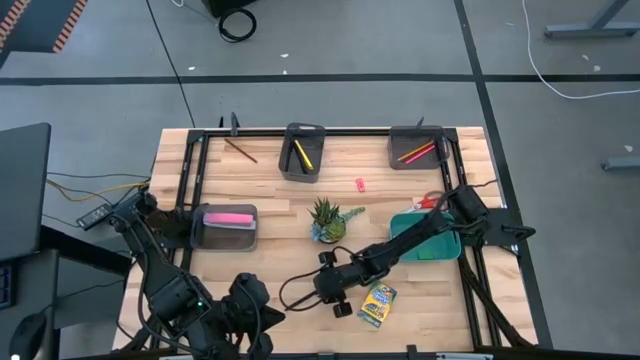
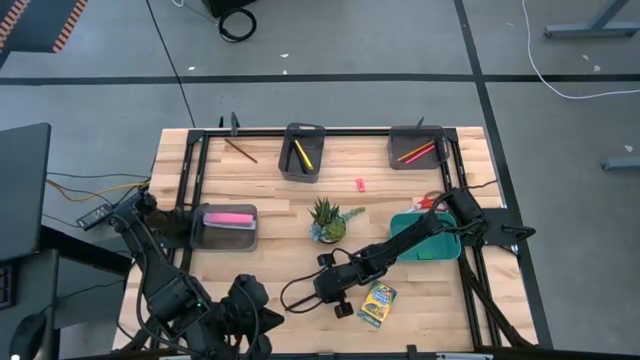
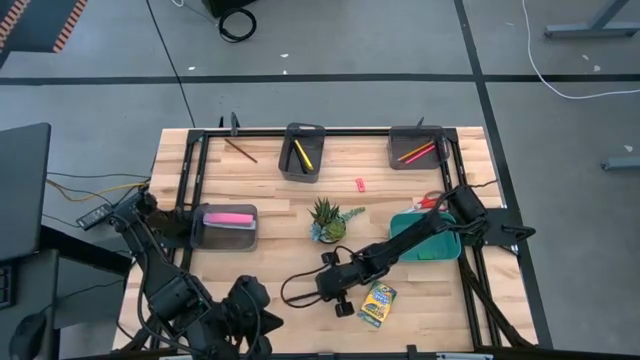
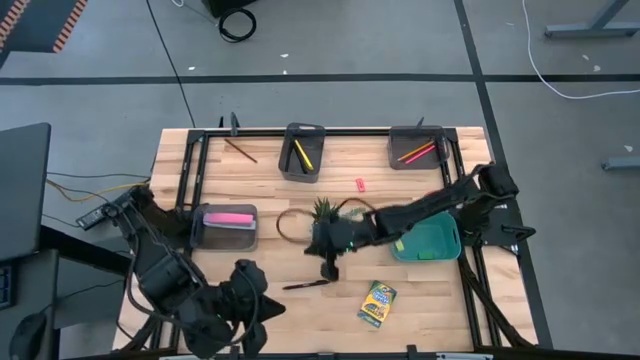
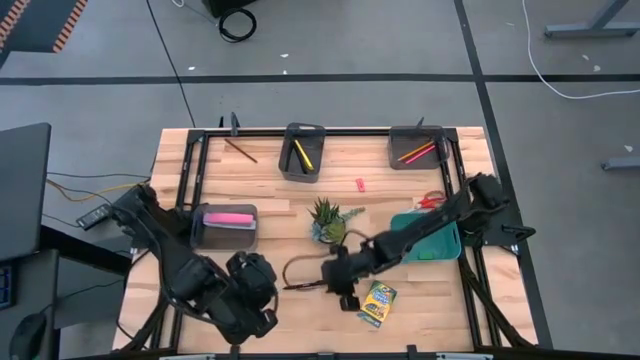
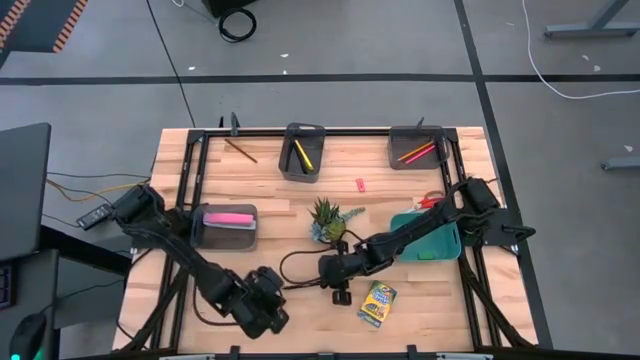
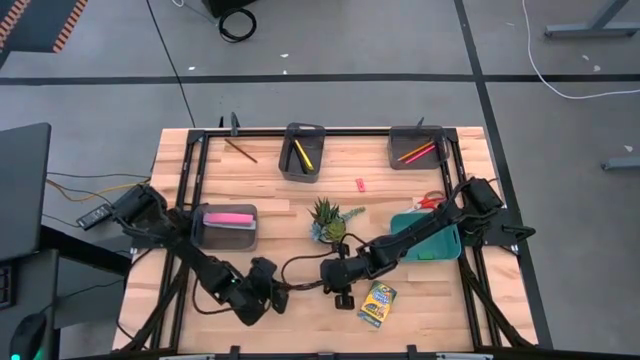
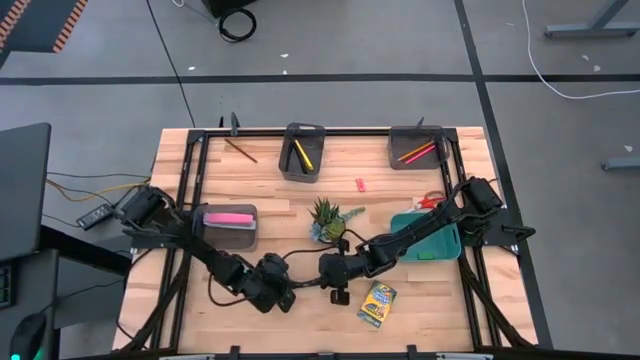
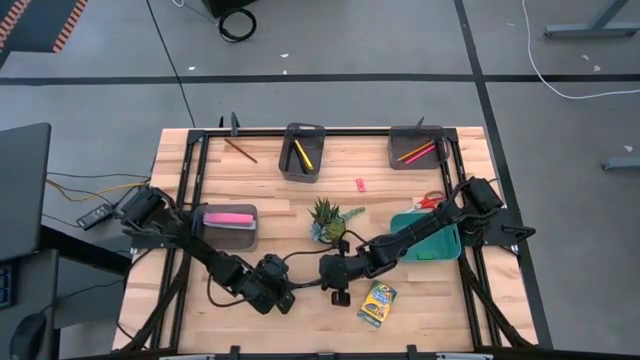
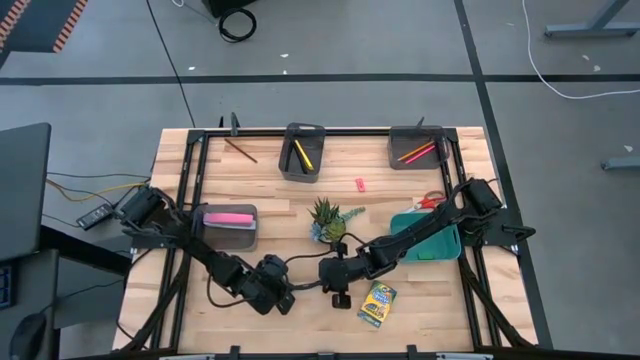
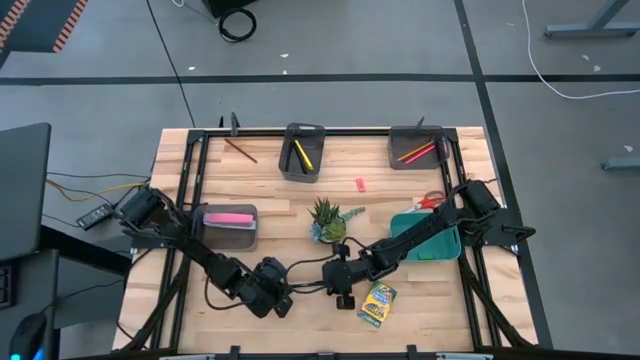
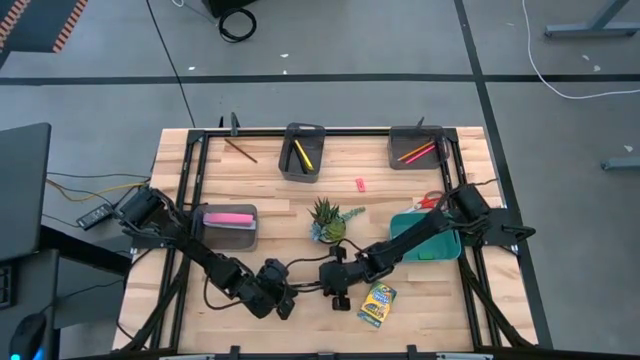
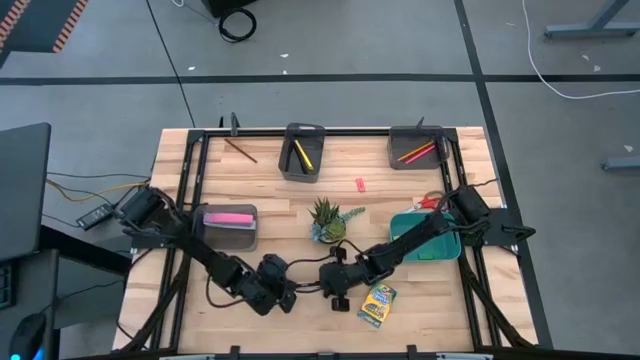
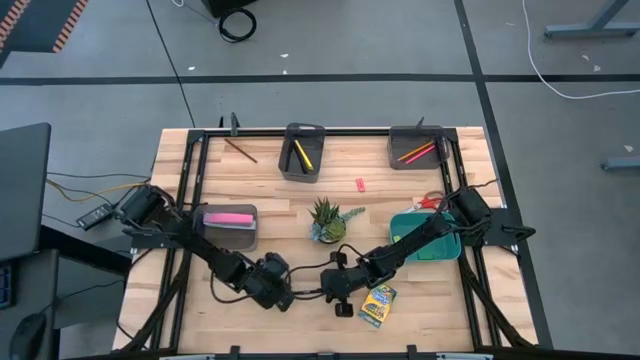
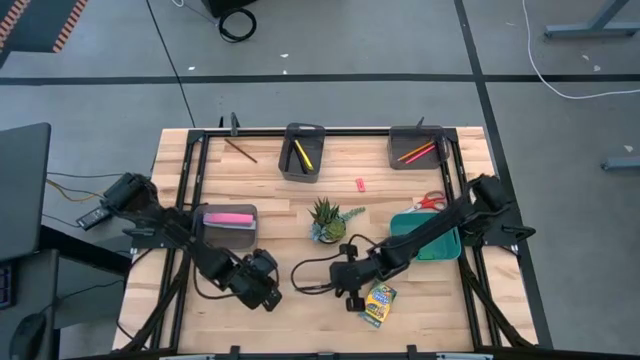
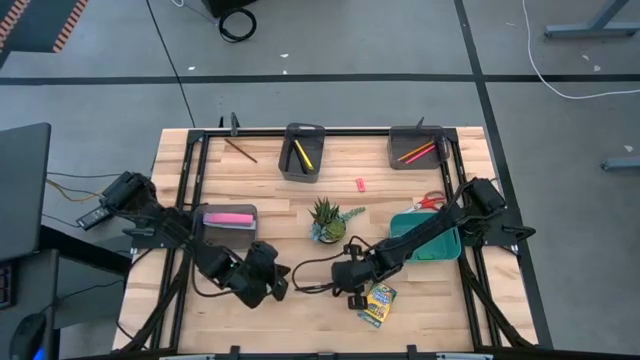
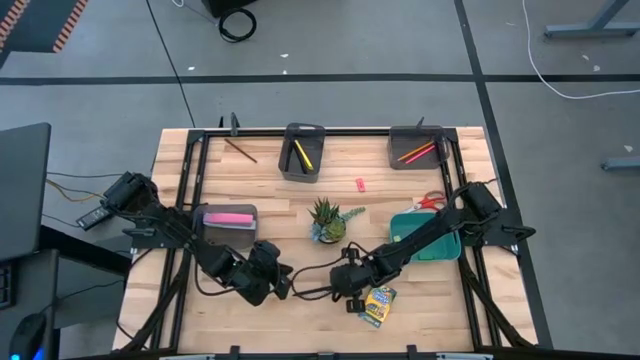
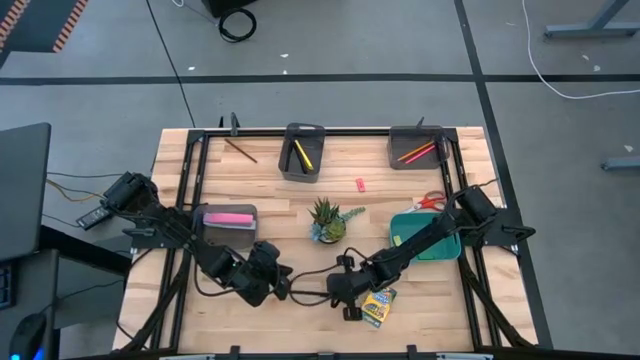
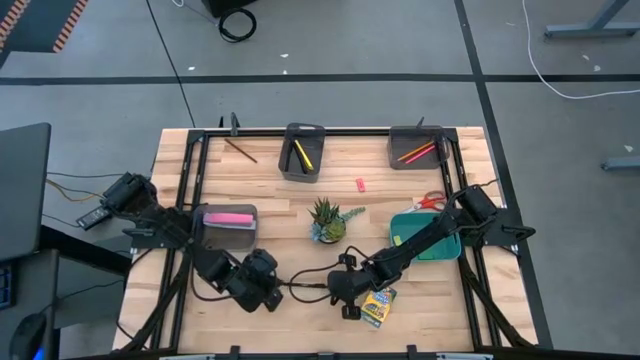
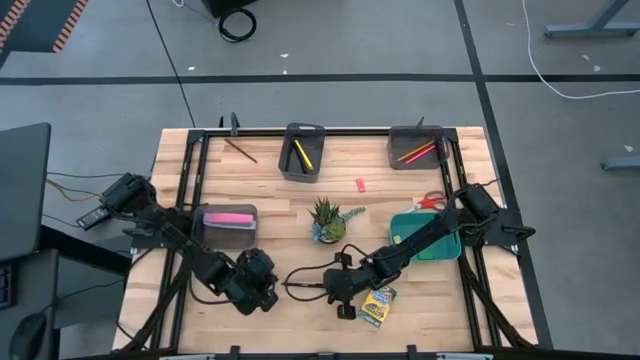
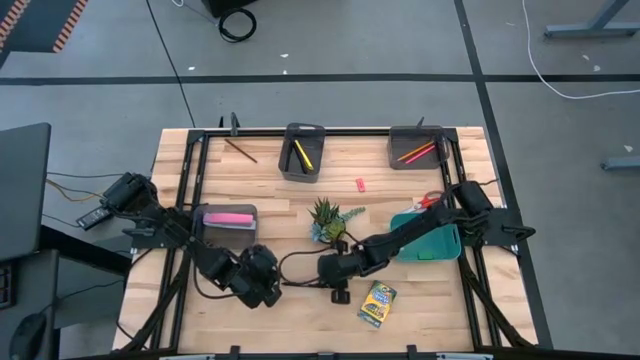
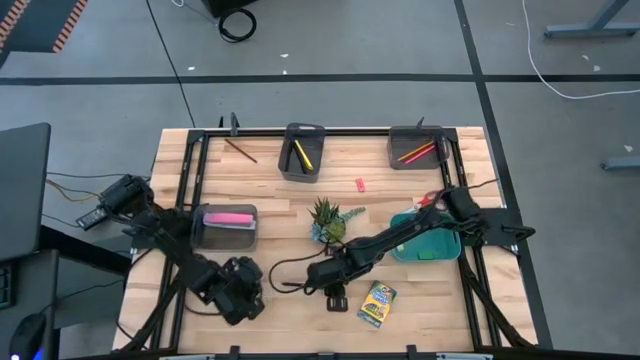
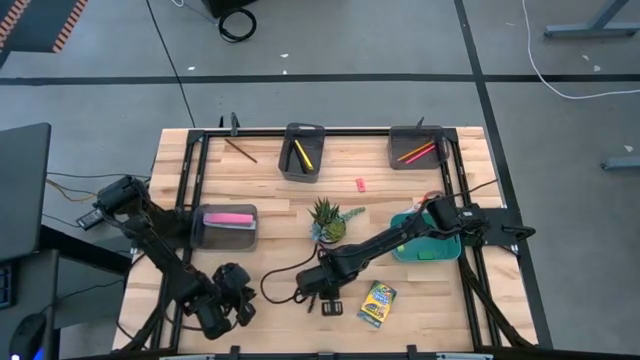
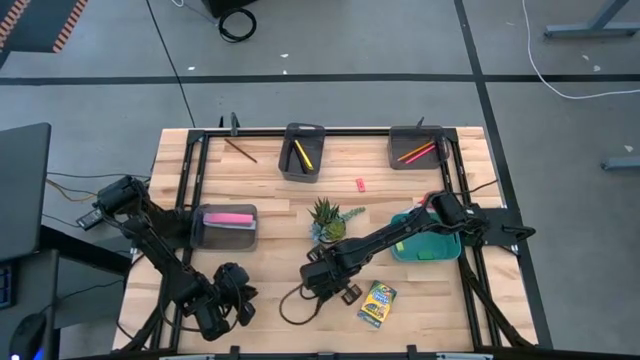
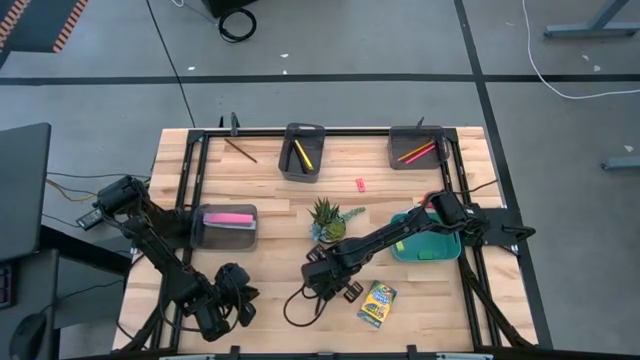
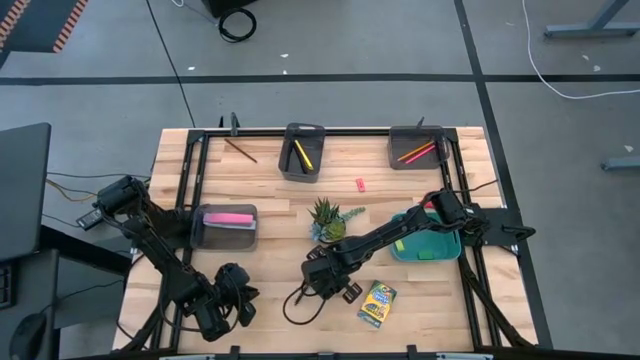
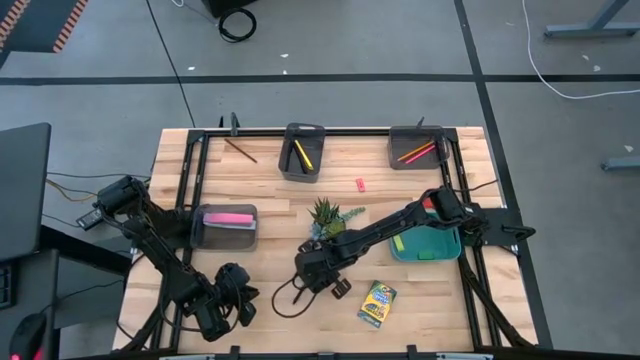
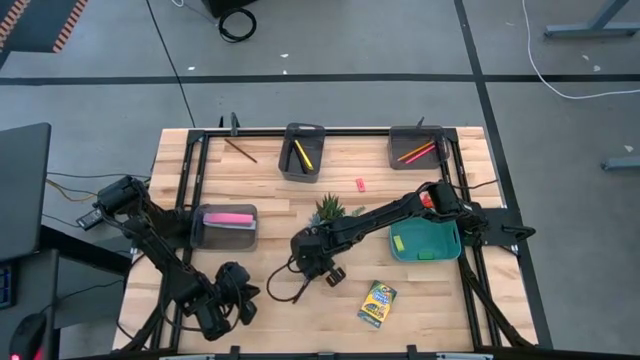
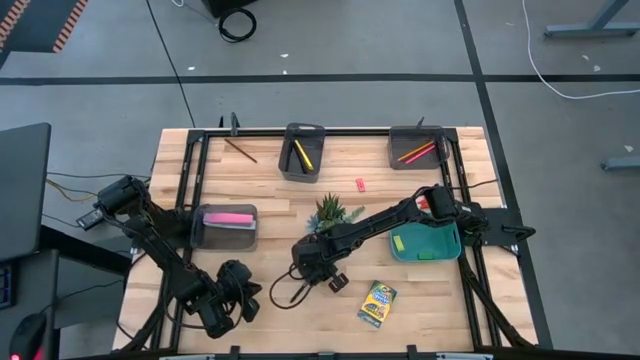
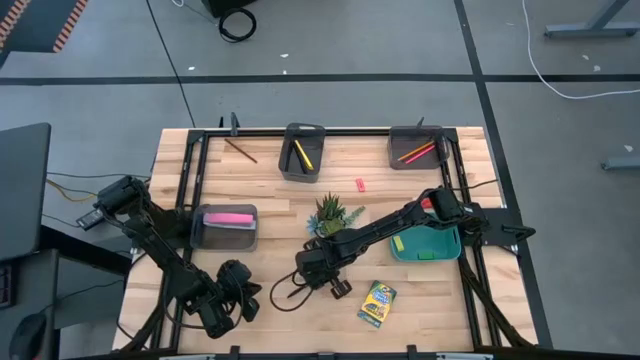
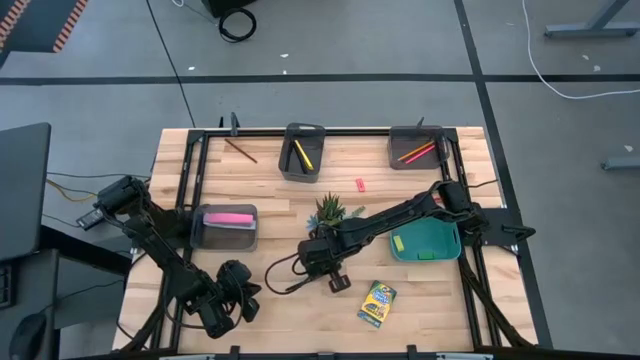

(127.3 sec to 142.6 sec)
Task: Sort crayons/erasers/pens/pencils in bins
Put the black pen into the left black bin

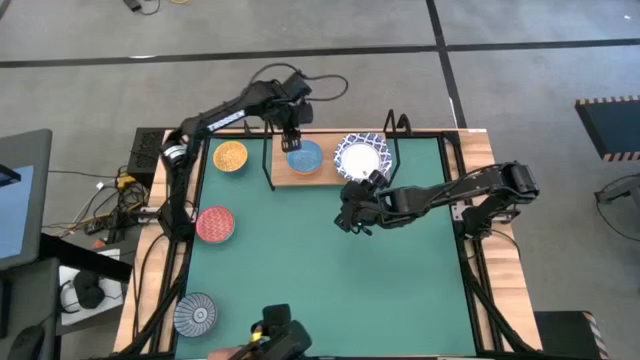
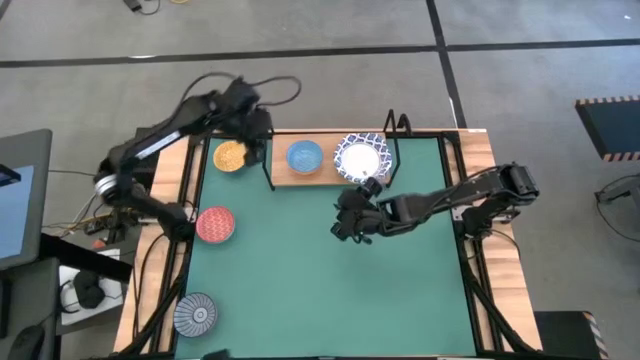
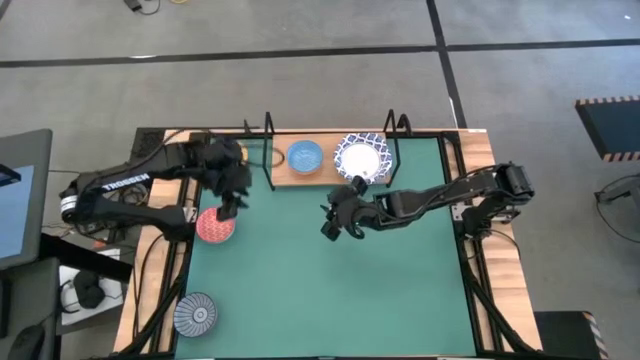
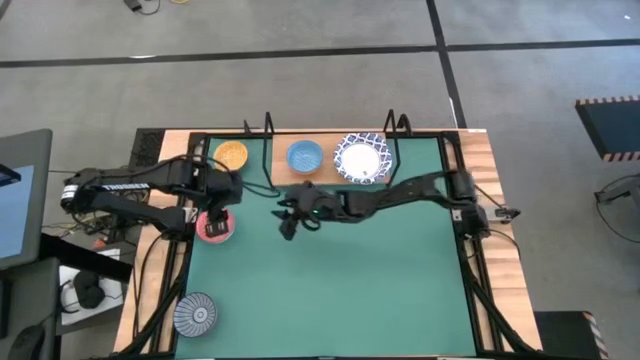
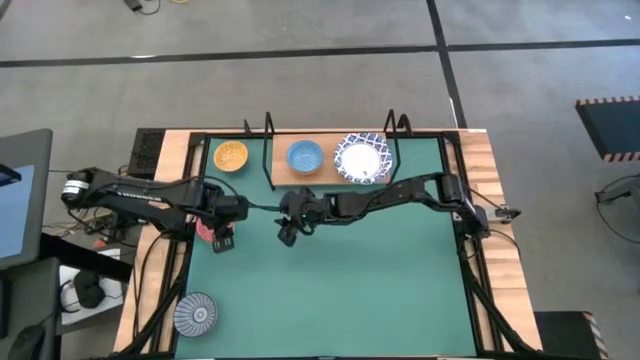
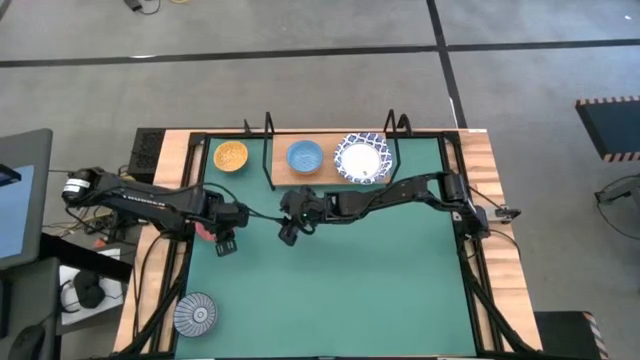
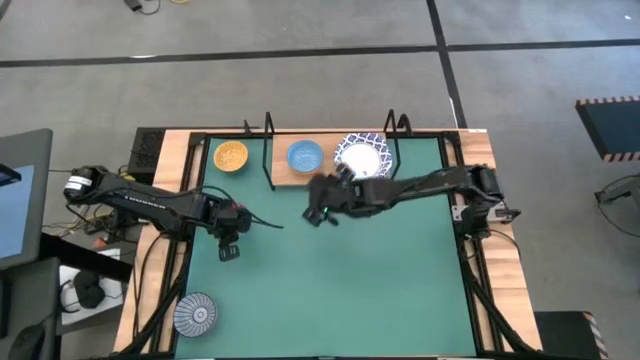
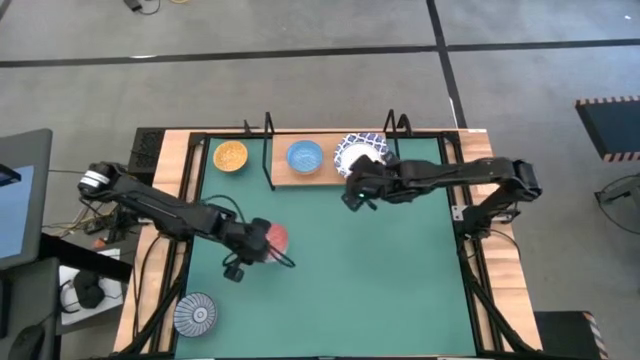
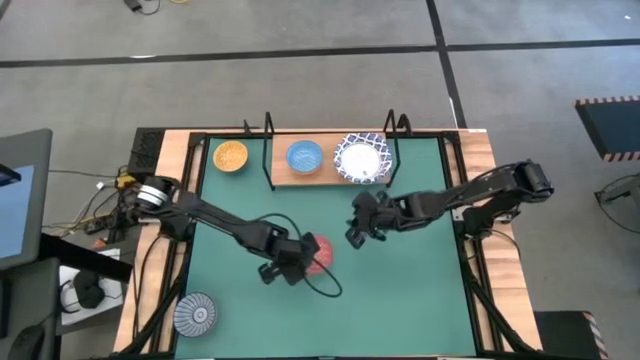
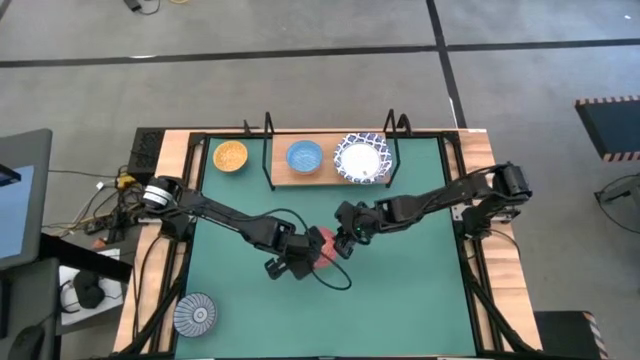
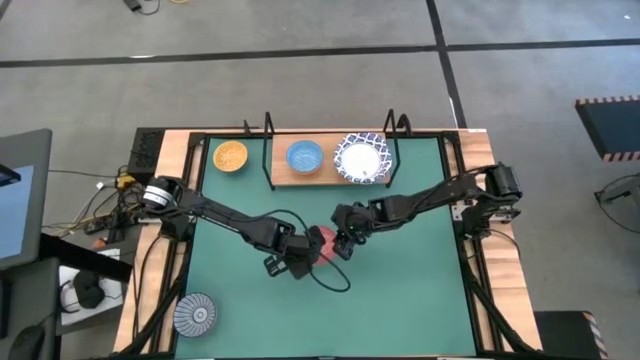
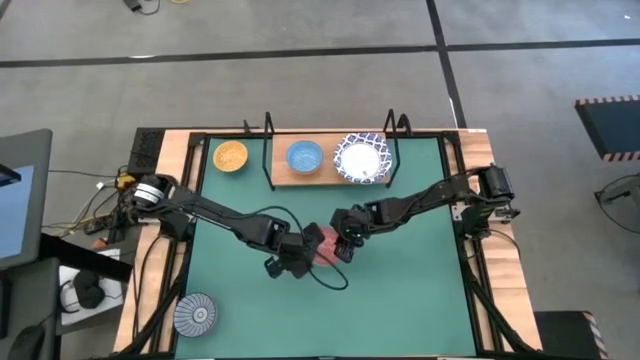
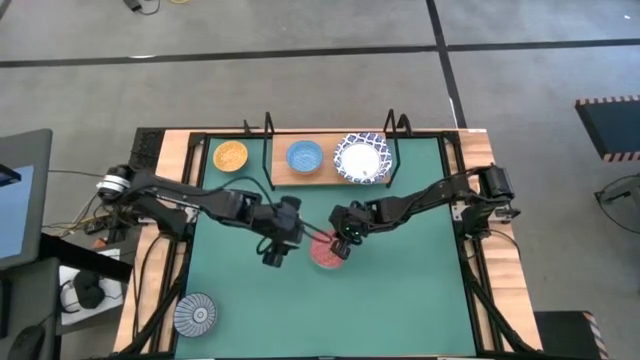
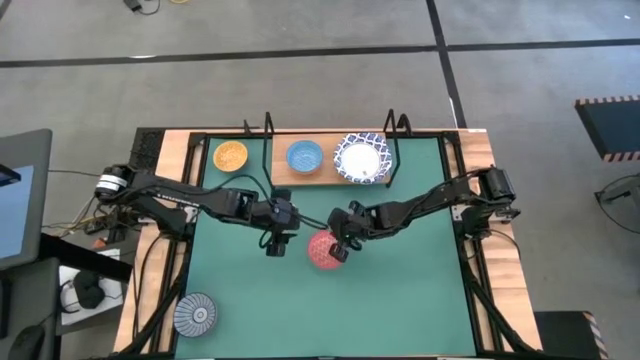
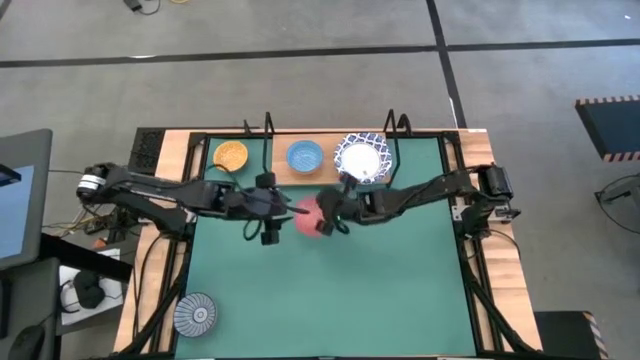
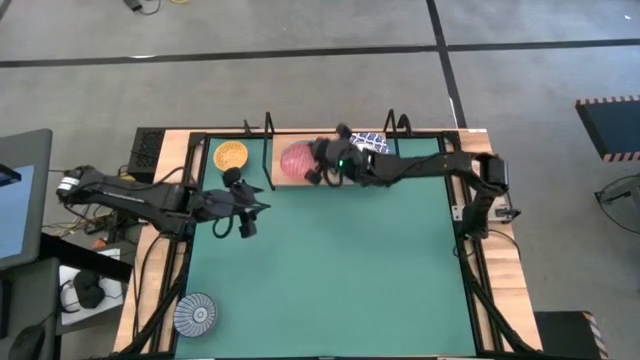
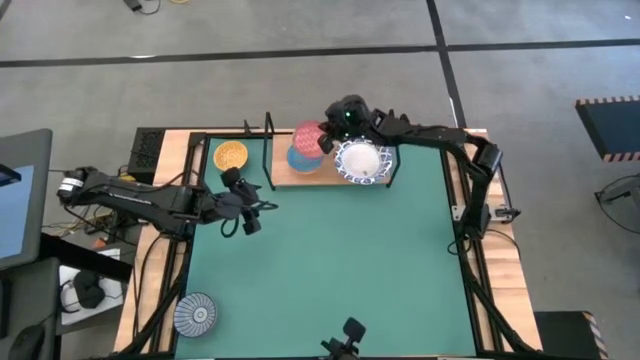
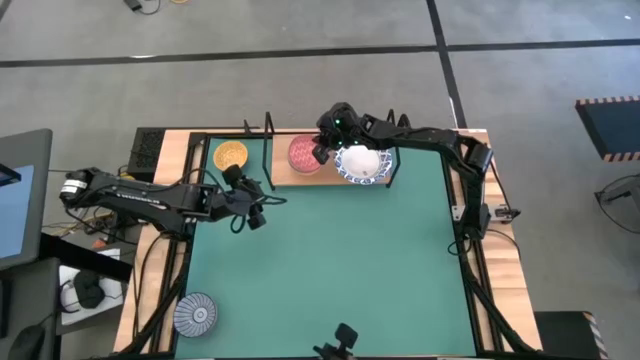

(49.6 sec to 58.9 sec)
Task: Place and stack bowls onto a shelf
Stack the red patterned bowl on top of the blue patterned bowl on the shelf
